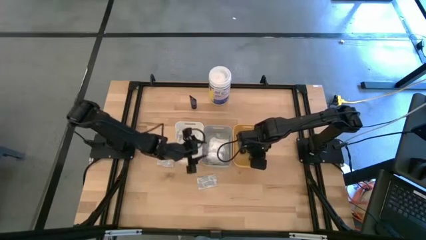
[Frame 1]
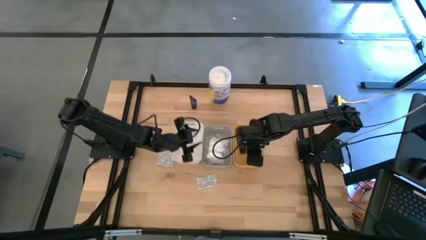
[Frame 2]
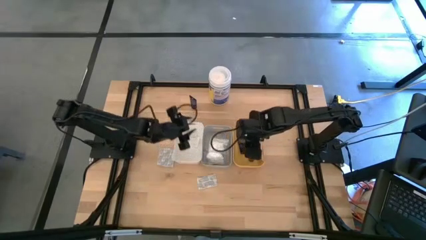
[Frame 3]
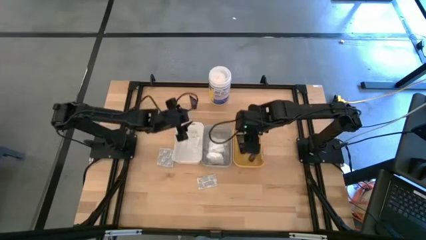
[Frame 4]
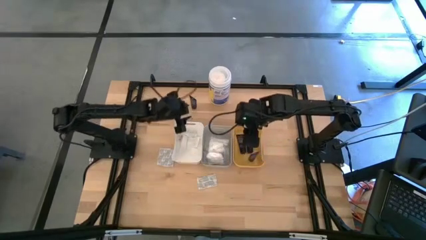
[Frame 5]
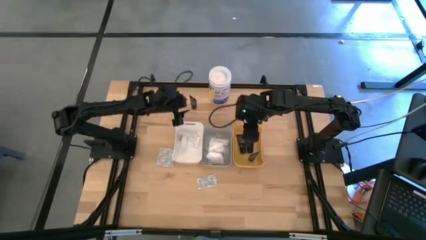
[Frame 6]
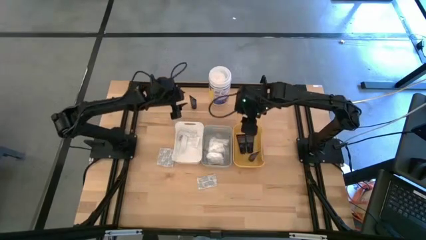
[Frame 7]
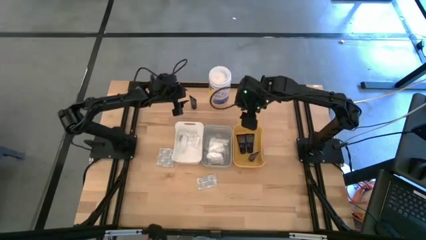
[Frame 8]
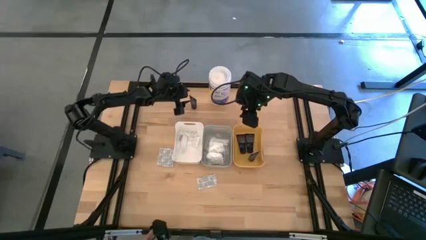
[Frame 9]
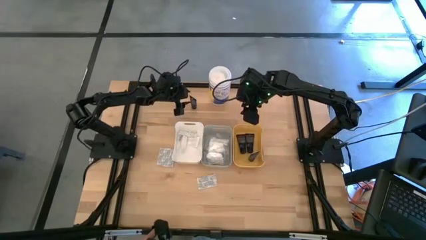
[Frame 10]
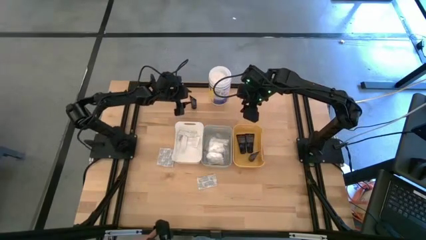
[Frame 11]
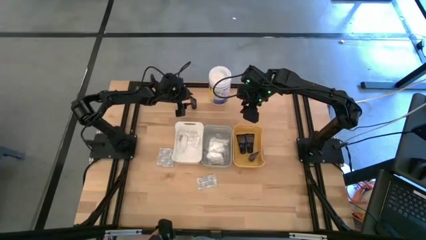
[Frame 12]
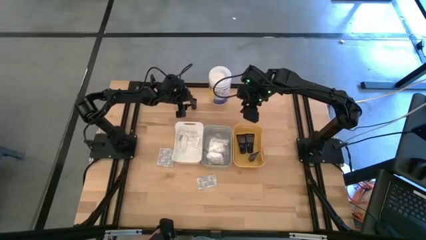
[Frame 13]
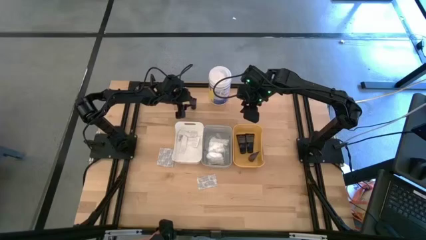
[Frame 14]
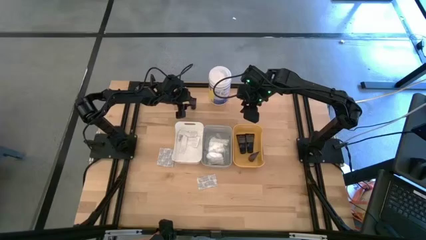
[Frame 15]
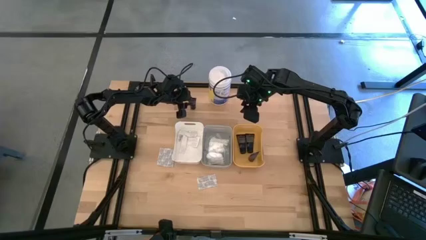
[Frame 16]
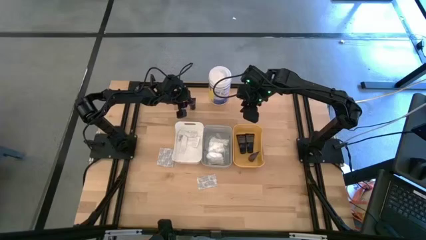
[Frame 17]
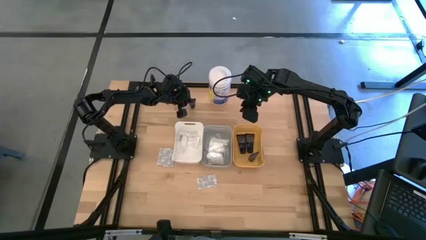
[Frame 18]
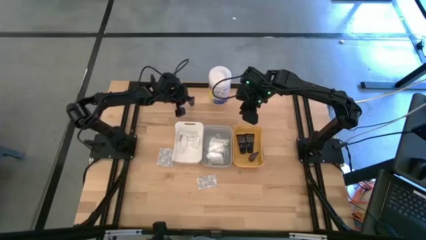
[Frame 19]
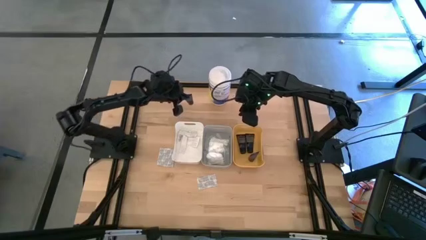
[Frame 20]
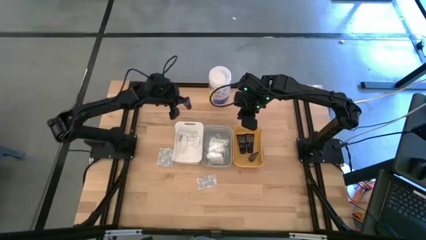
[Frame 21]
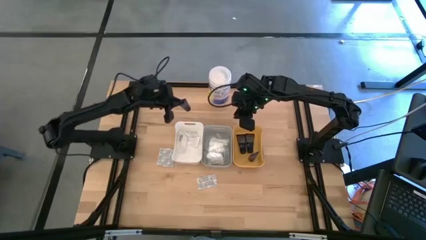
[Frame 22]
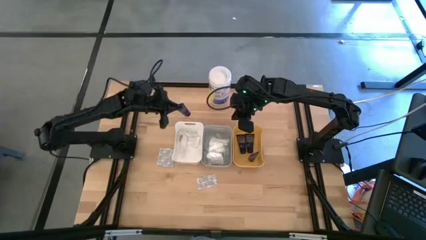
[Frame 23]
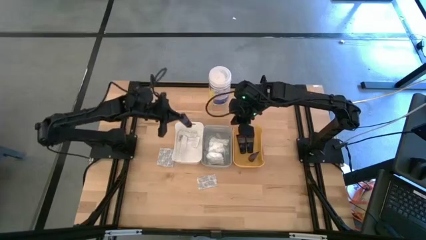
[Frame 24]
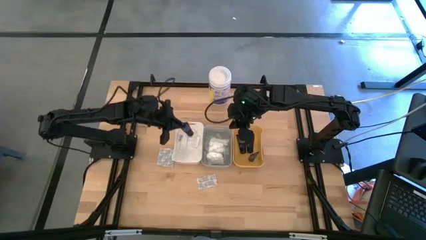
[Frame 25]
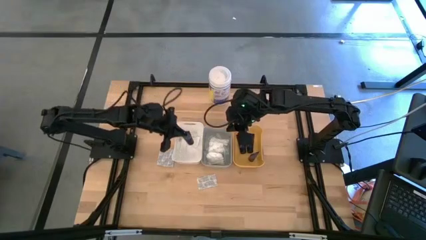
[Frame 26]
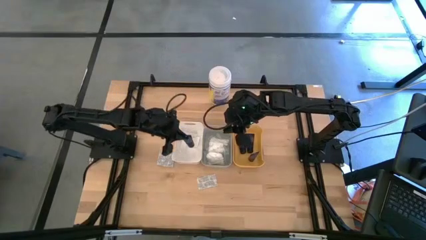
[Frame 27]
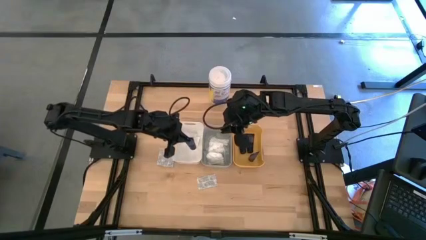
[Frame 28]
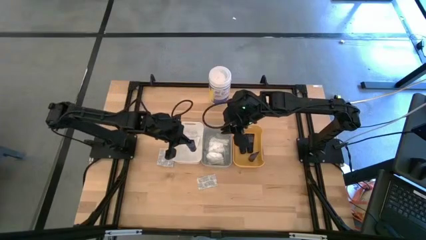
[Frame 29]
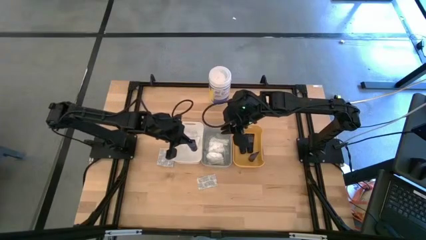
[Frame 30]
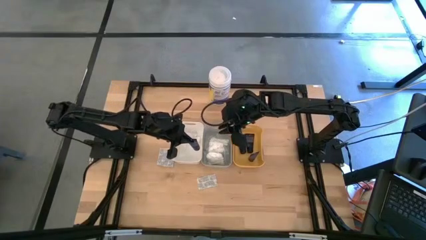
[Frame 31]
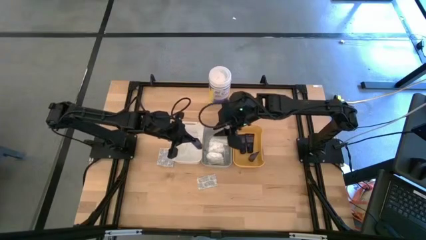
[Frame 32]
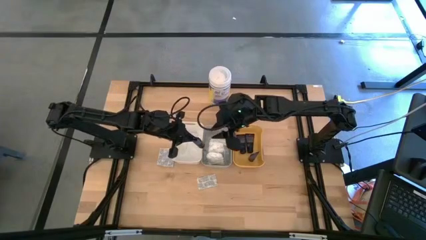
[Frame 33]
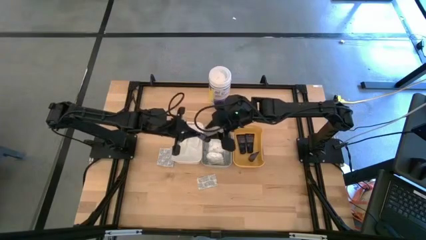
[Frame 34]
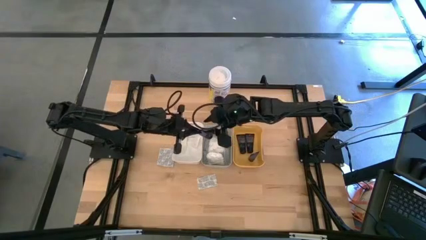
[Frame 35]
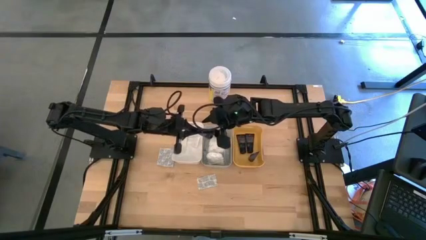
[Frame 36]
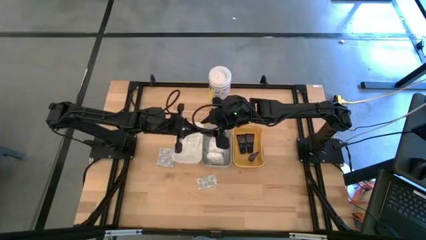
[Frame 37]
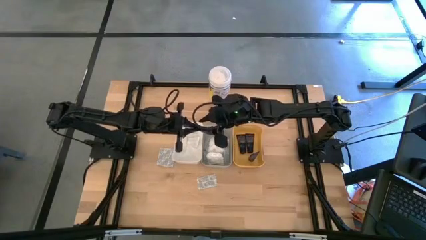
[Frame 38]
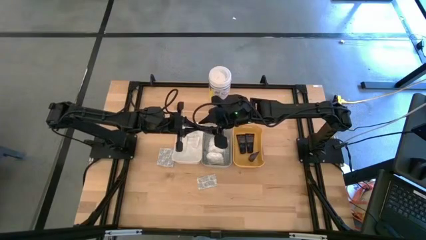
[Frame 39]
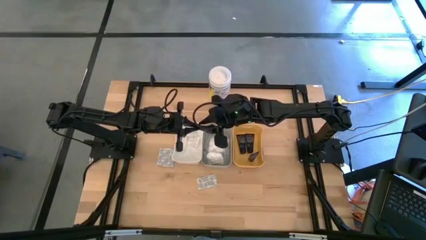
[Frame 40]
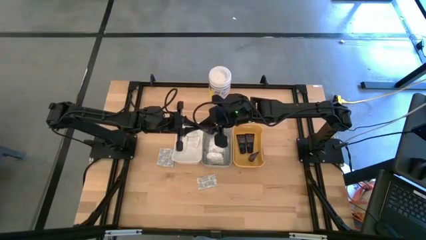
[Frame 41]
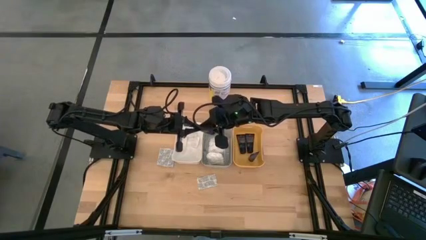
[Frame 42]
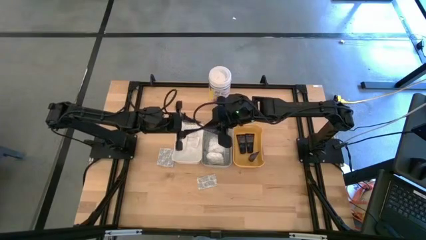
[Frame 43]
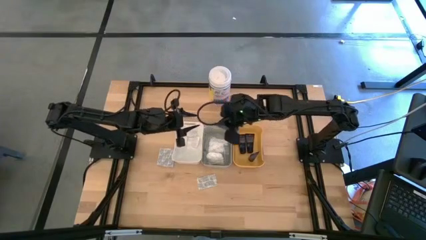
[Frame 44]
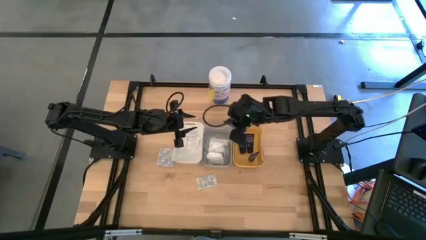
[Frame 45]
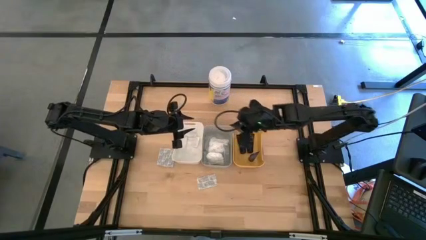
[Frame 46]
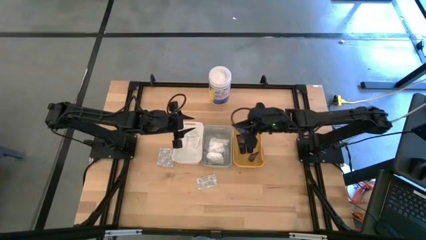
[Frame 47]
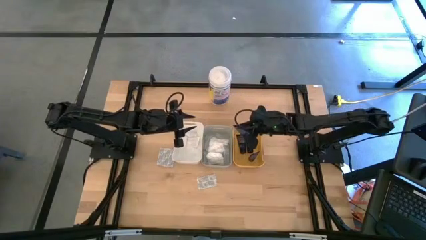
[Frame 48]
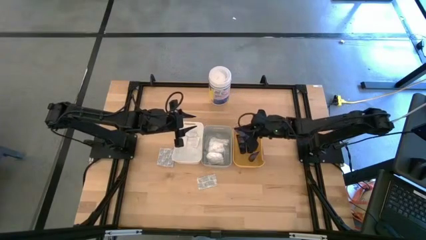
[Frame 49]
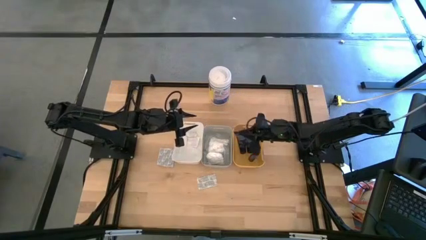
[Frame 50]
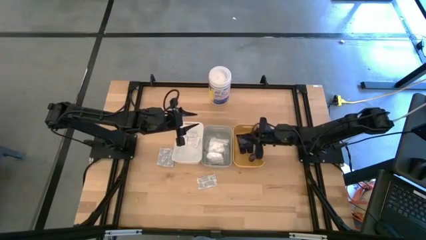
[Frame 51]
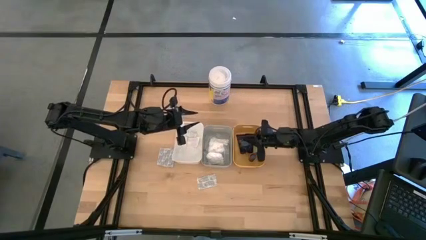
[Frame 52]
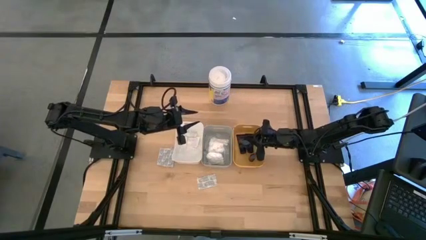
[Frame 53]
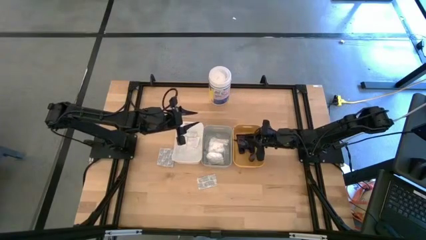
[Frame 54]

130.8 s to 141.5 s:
Task: Pick & Place Travel size toiletries
Put the blue shave cream into the yellow bin

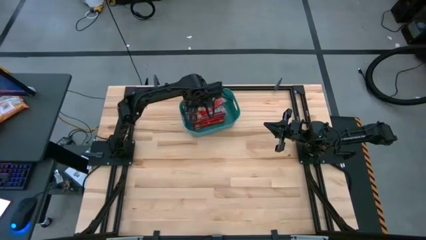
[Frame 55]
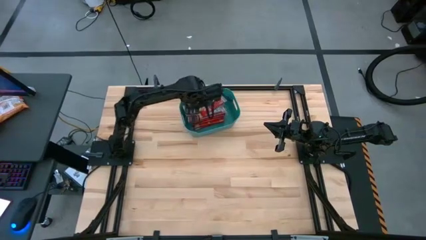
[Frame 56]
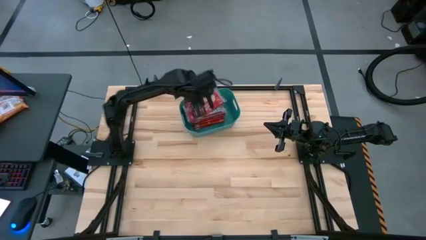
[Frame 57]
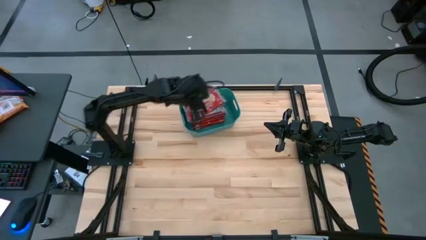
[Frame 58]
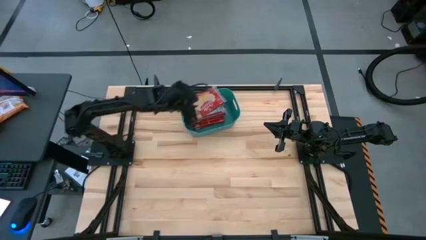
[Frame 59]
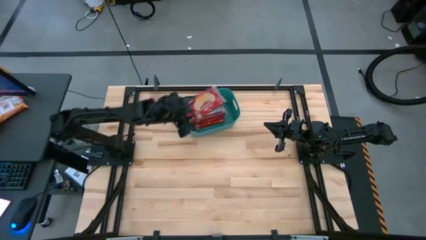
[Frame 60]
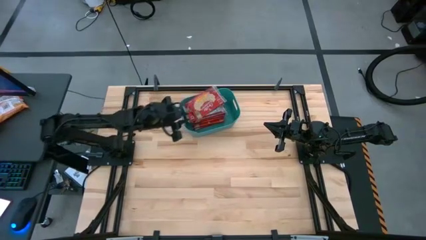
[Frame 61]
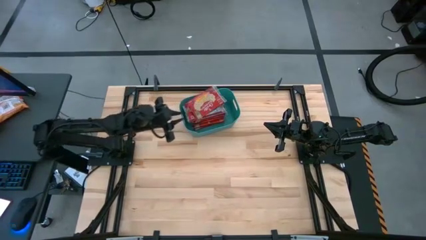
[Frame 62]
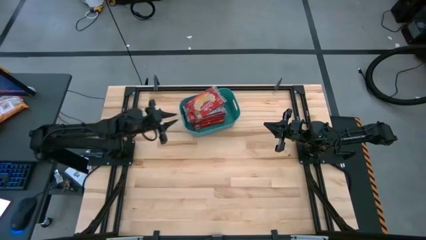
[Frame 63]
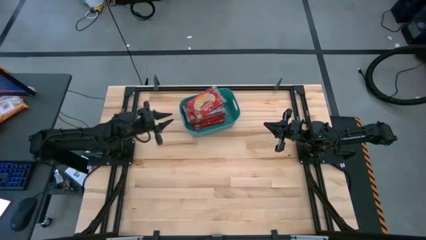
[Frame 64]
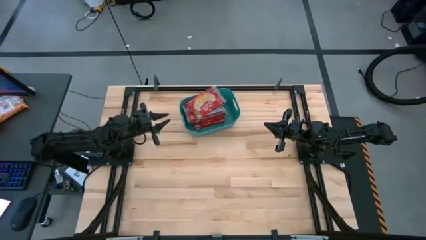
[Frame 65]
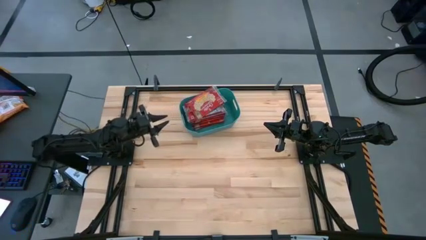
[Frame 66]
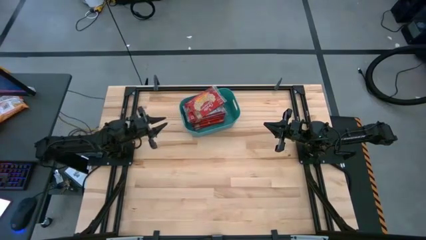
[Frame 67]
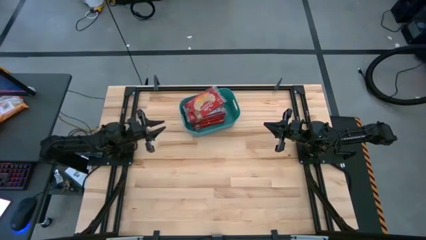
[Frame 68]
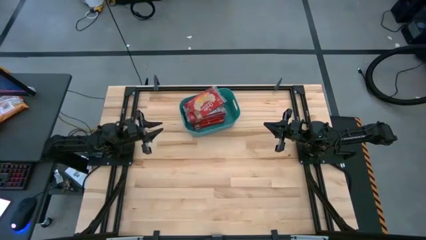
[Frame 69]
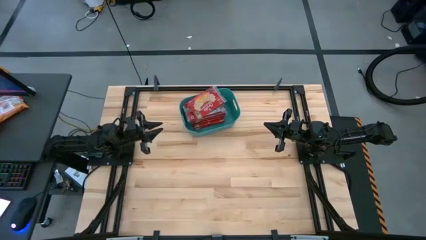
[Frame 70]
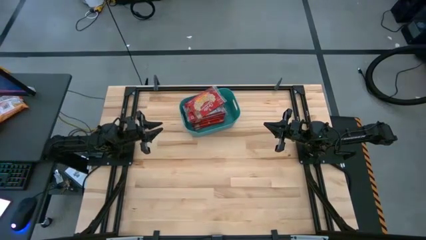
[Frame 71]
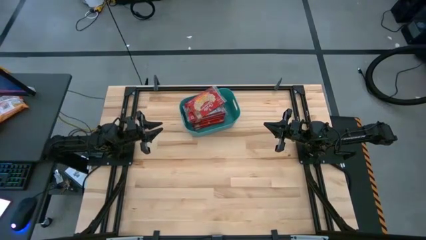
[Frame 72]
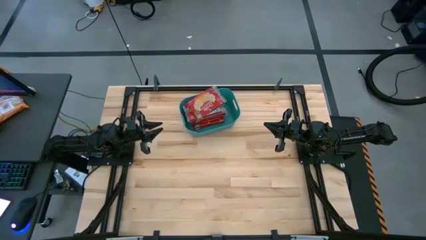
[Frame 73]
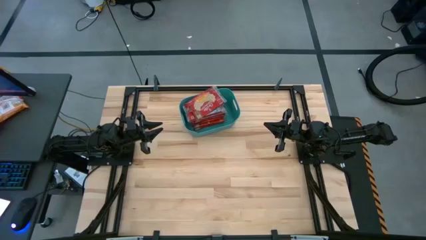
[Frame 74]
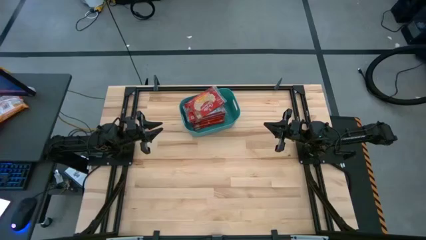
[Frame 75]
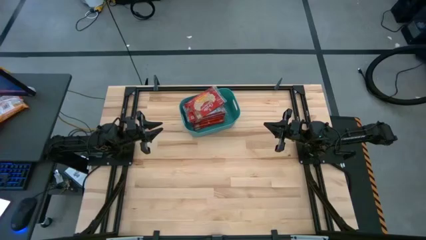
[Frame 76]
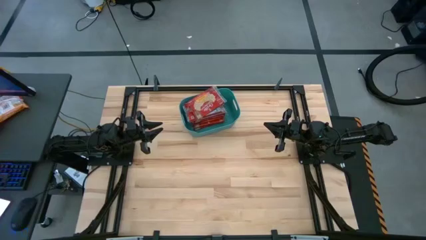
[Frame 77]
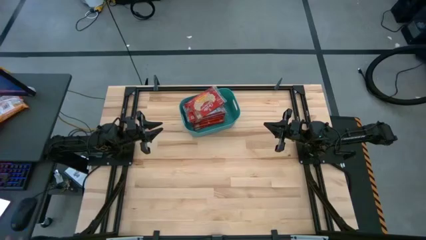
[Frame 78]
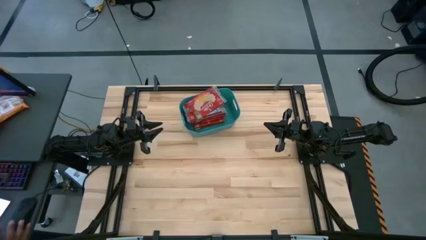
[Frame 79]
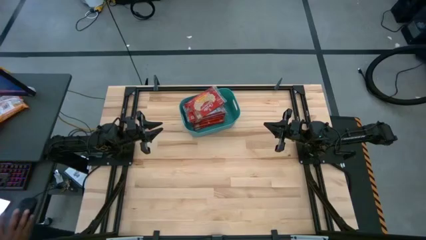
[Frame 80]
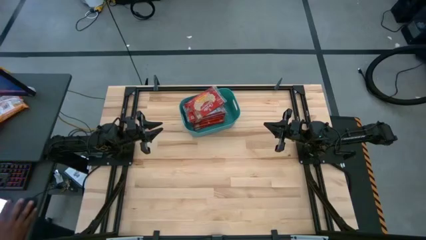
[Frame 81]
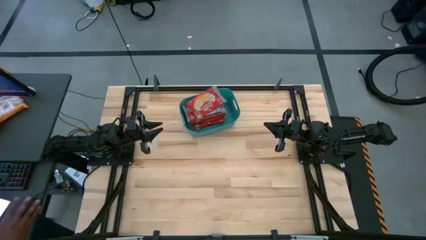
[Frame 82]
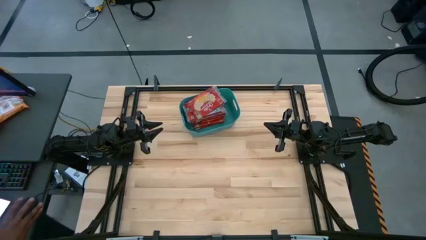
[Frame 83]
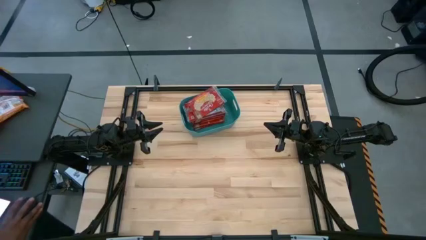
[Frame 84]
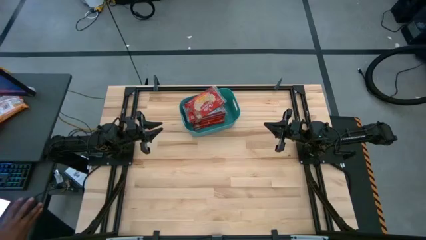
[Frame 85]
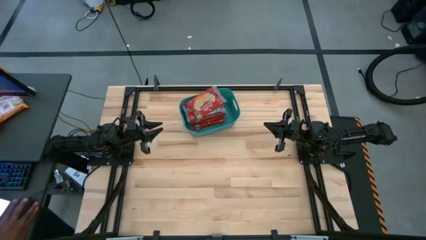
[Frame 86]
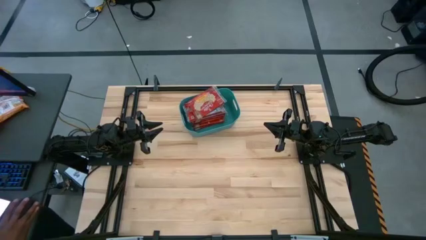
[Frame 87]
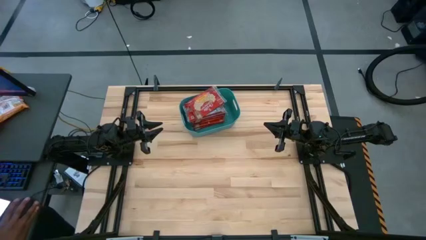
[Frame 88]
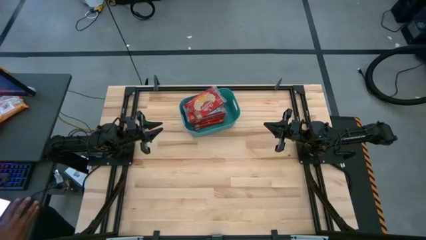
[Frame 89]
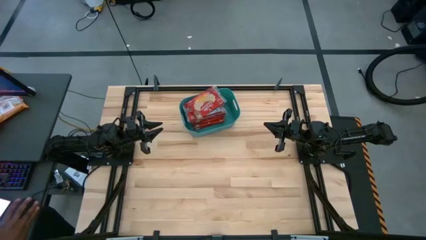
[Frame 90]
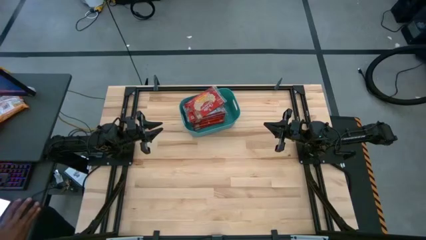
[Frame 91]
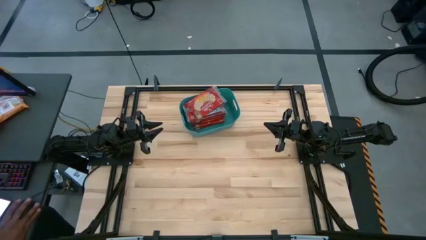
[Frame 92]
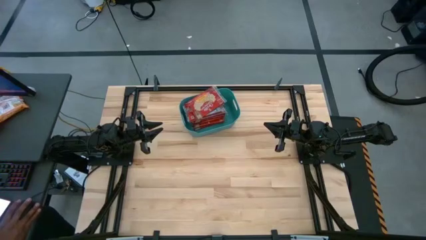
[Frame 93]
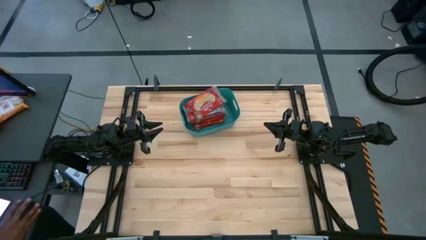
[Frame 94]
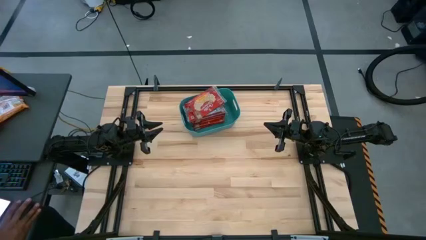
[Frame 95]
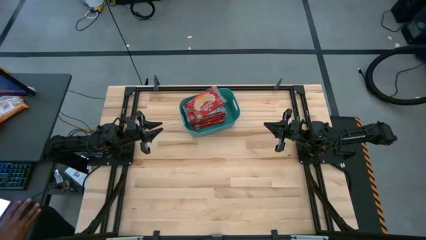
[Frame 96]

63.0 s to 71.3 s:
Task: Sort popcorn bags into baskets
Return to Home Position
